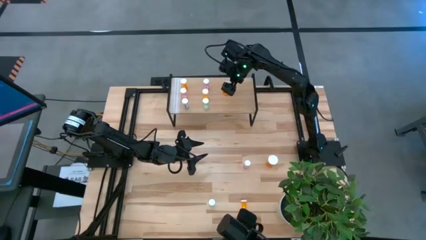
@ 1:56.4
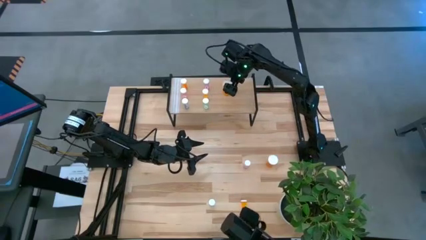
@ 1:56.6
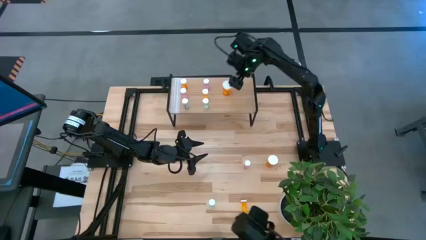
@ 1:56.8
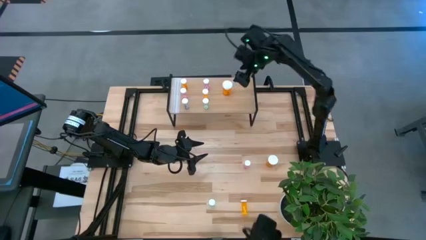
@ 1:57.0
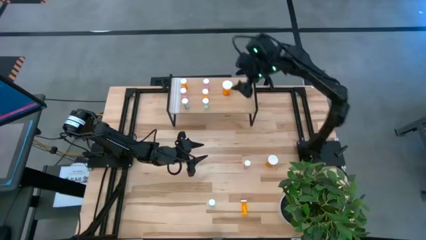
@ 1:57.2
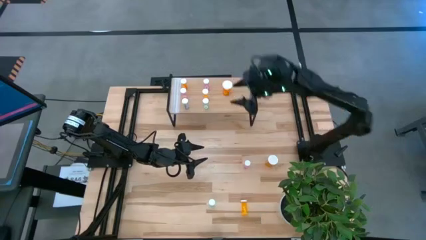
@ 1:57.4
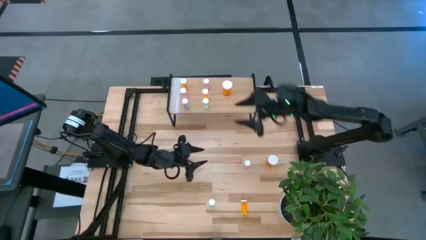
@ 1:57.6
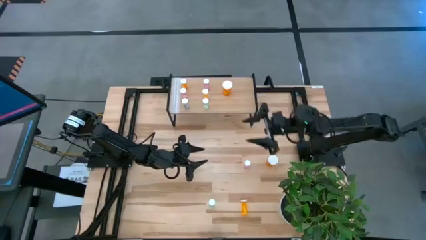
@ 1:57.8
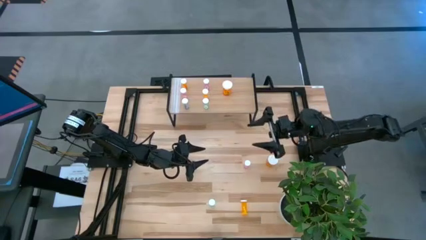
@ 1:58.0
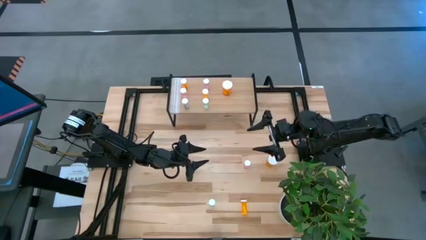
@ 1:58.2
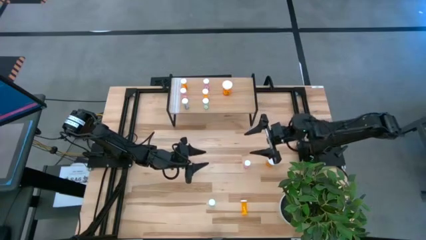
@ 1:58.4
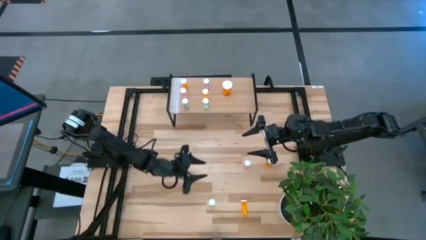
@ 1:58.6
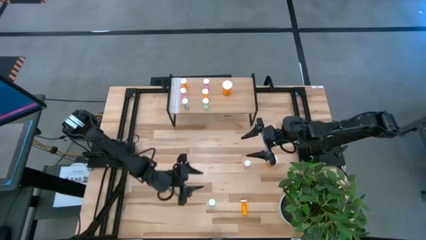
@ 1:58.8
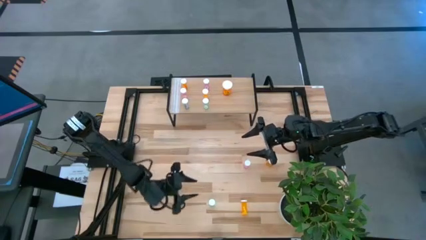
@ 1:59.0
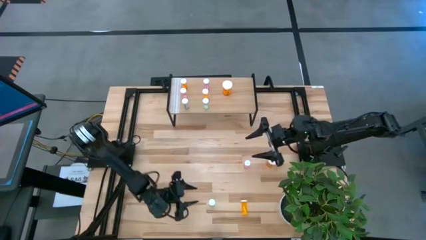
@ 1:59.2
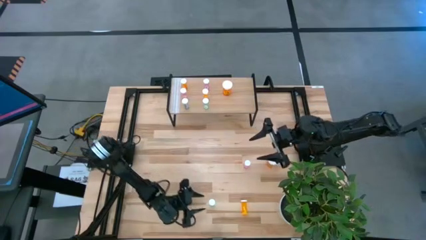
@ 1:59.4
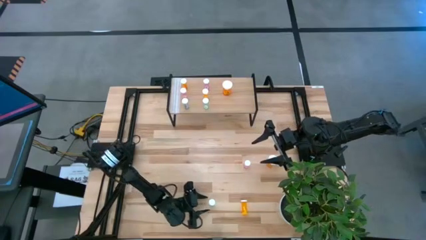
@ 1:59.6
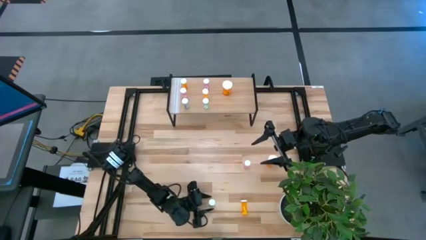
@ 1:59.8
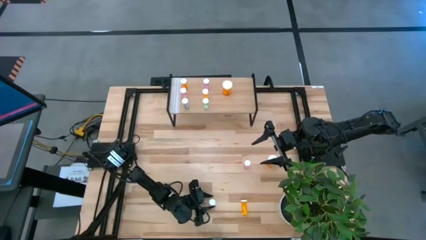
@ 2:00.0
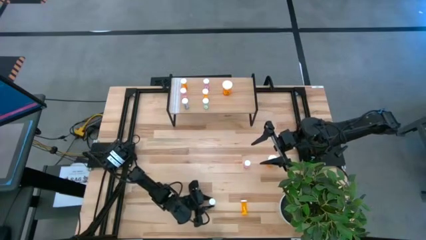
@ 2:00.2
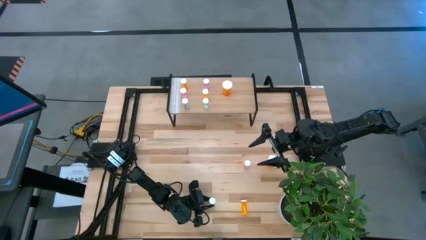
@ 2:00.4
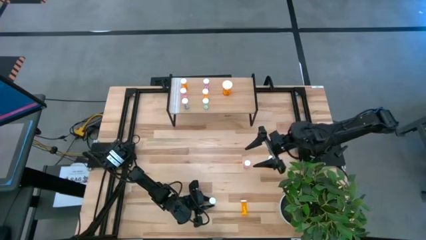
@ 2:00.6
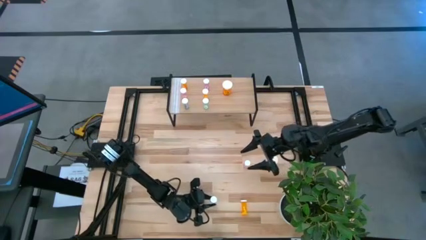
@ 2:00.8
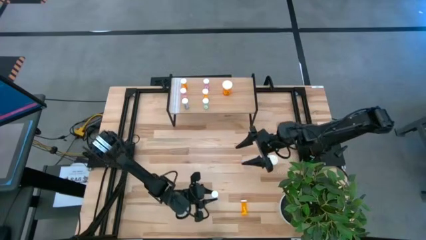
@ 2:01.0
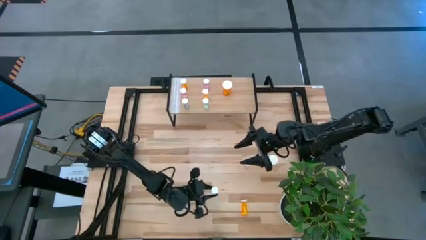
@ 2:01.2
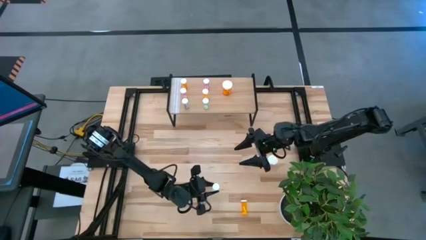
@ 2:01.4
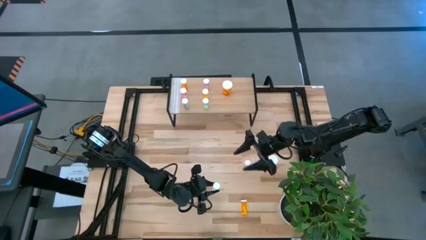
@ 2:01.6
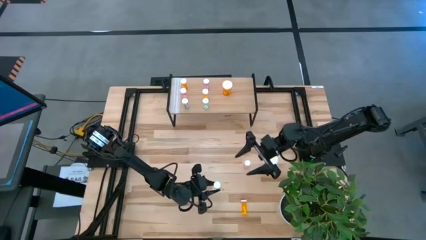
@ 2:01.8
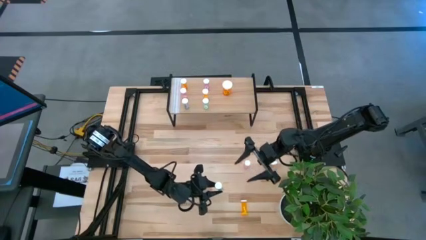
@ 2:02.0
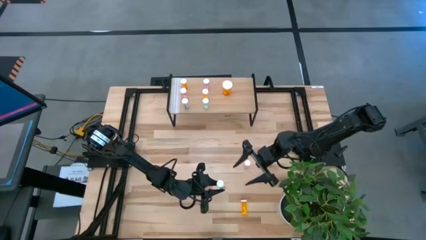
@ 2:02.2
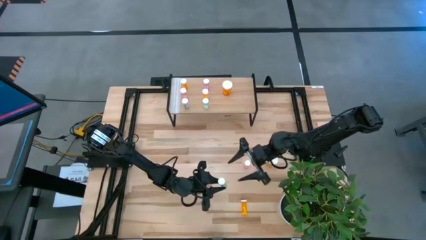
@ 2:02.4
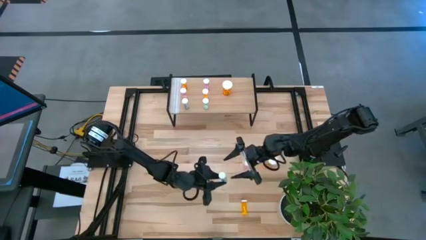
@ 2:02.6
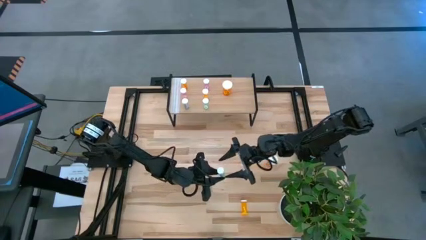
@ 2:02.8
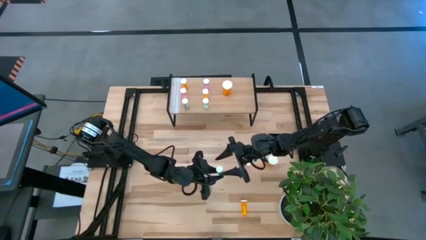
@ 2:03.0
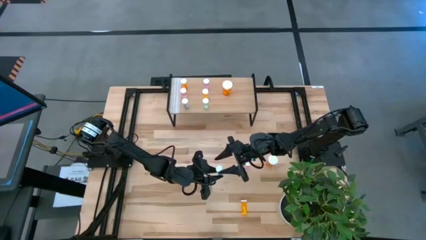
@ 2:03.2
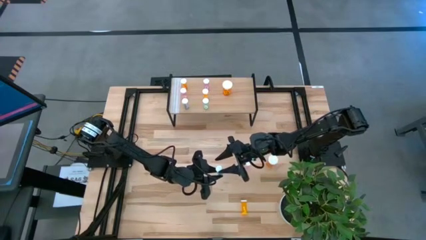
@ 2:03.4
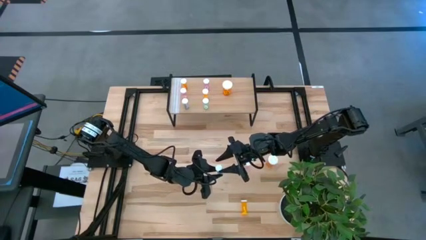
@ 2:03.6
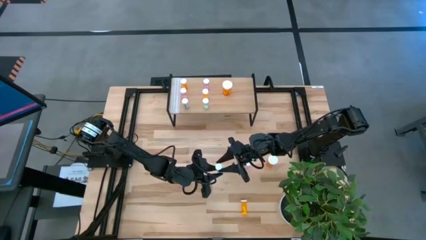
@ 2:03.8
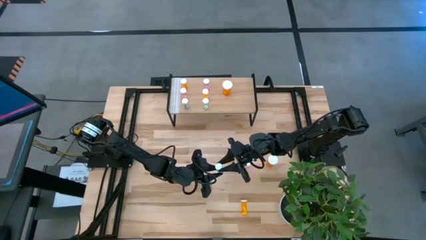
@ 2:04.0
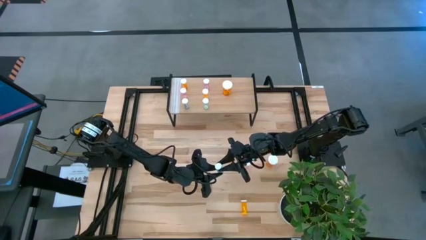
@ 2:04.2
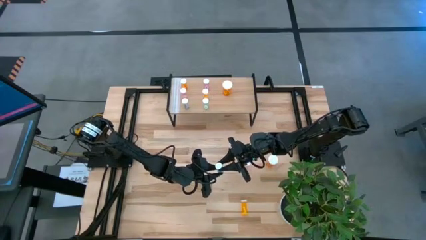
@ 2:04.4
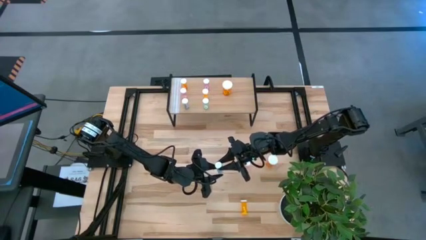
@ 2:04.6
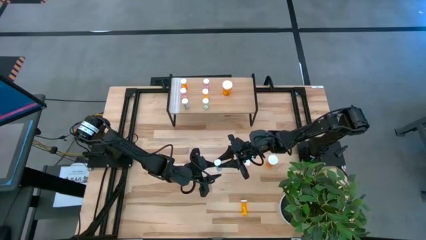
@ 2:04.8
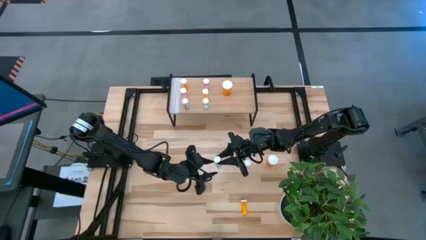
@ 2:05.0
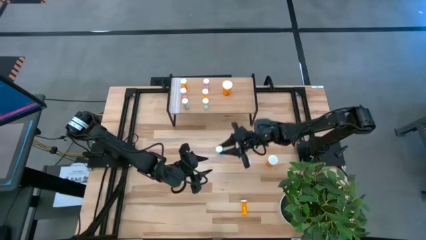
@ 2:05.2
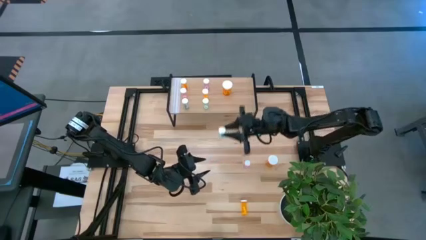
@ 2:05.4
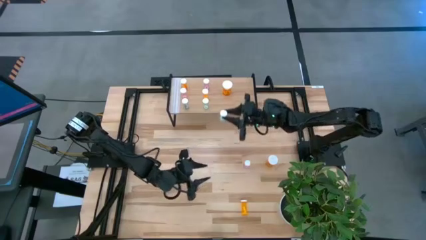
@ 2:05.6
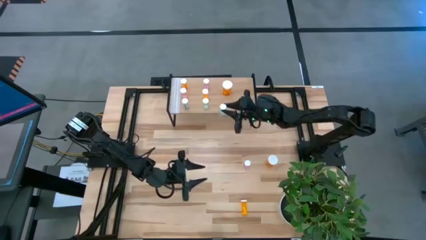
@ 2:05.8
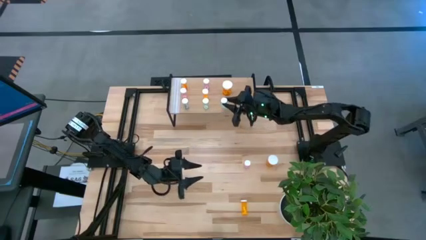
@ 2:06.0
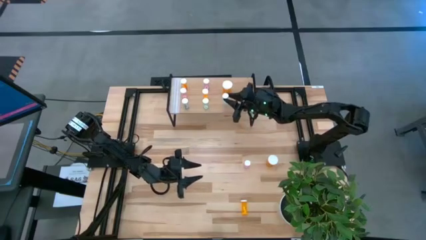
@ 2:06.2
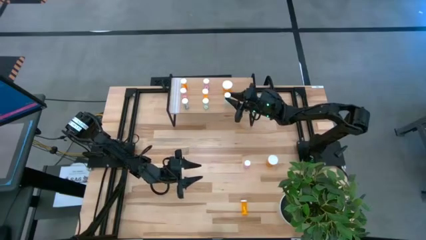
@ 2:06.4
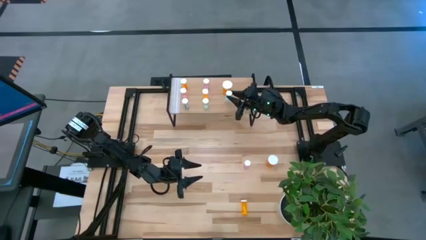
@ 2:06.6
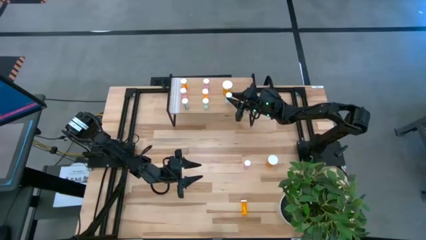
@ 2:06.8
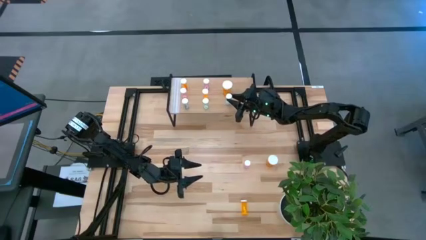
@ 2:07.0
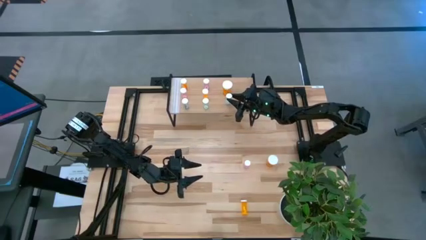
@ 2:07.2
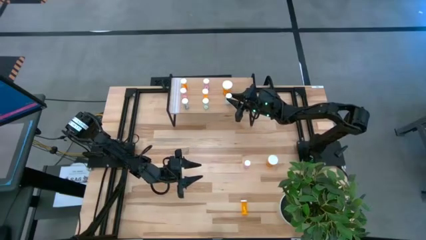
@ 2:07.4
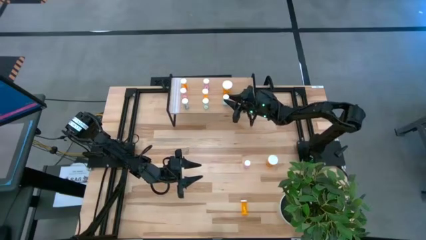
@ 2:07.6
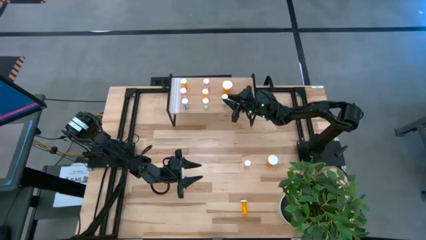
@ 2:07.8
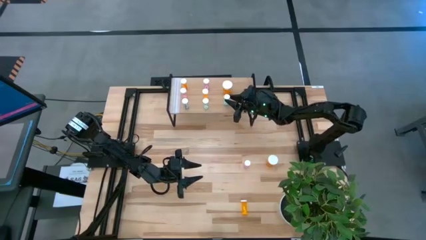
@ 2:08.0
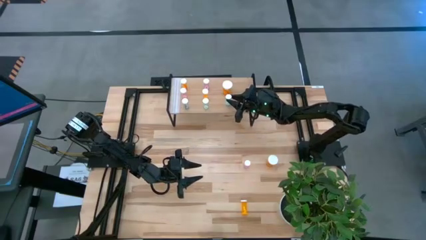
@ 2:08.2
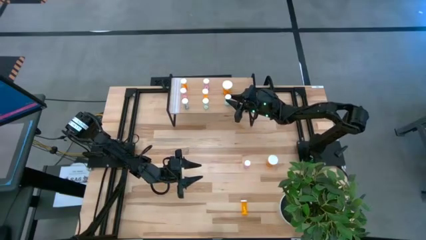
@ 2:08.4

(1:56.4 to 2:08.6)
Task: Pick and place medicine bottles onto shelf by color
Put the blue pill bottle on the shelf

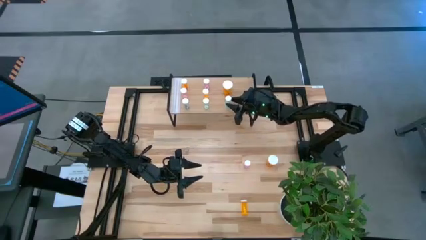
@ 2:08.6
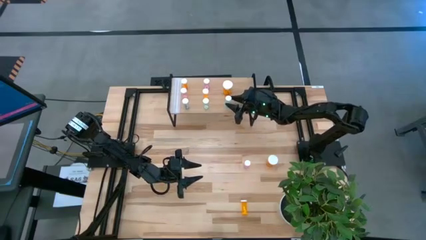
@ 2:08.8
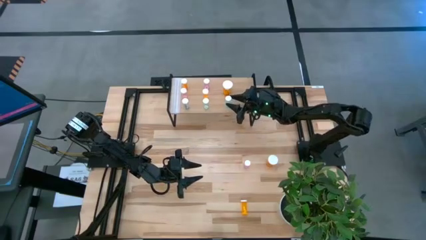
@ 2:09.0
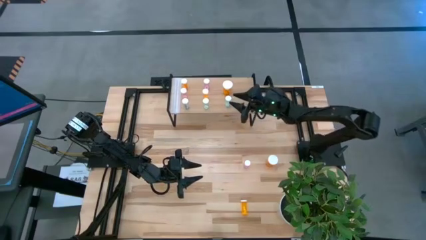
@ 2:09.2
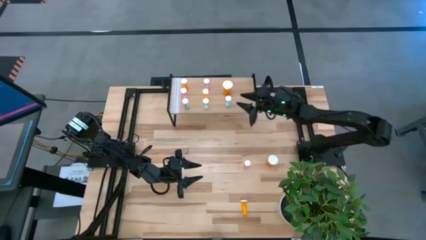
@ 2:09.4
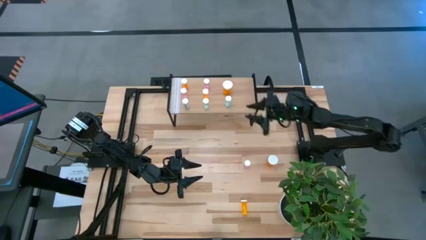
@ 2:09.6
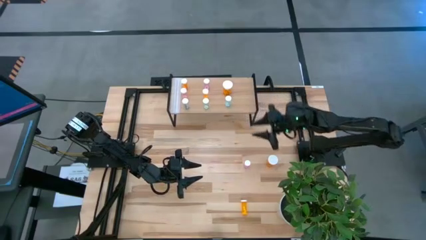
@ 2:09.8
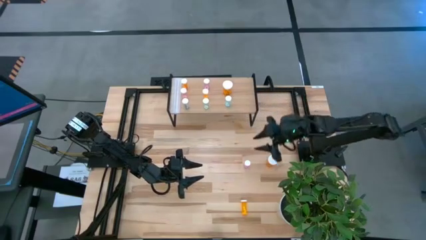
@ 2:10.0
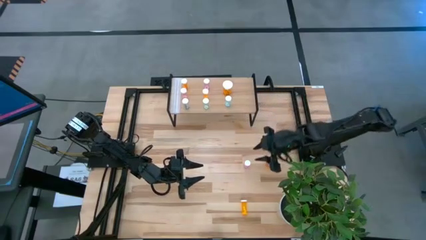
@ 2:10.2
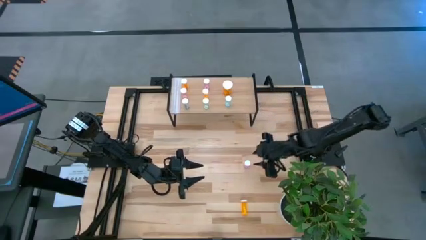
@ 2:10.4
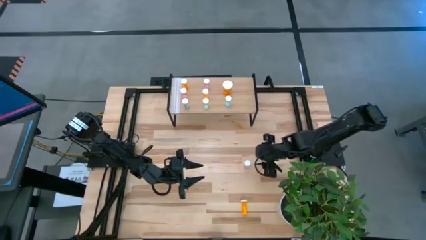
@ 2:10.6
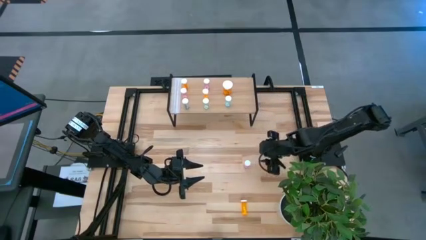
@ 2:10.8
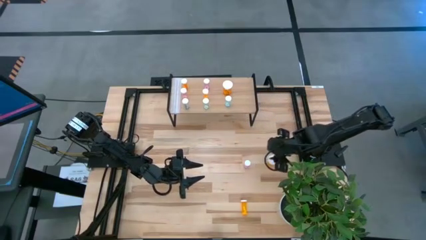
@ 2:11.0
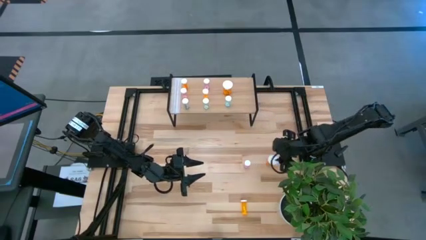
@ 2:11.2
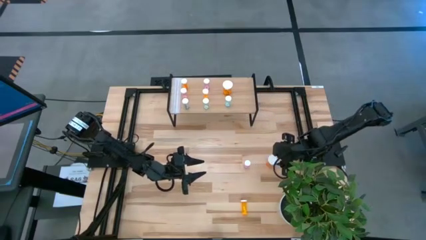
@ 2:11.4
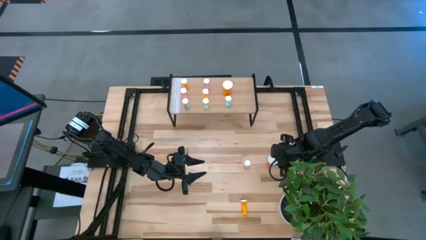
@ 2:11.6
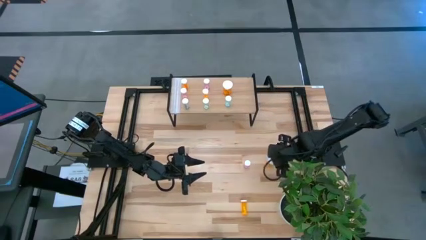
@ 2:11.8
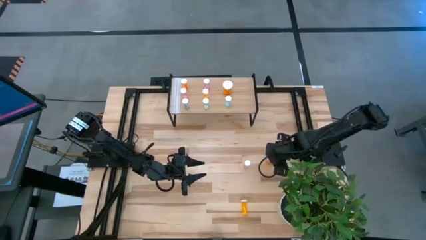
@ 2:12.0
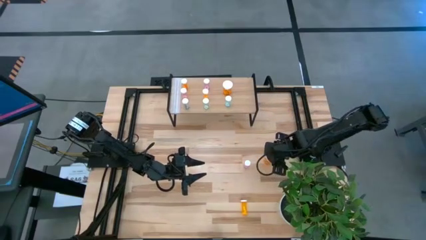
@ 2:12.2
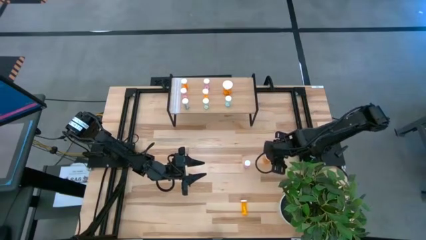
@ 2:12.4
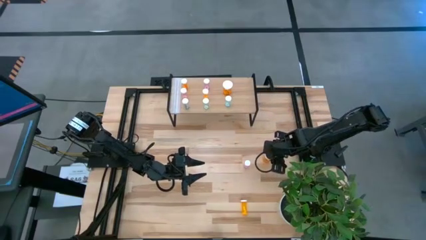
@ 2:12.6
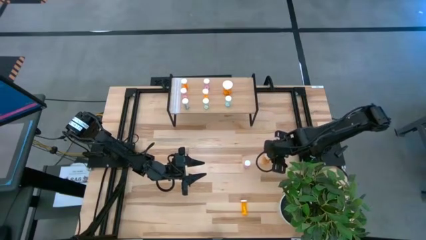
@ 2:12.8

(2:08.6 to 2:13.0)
Put the large orange pill bottle on the shelf

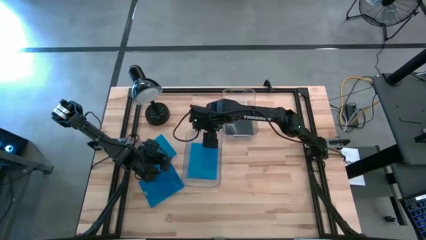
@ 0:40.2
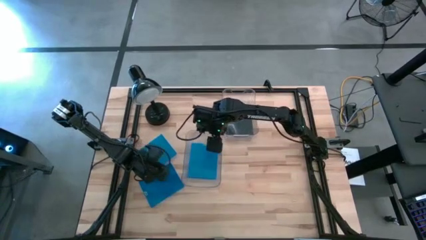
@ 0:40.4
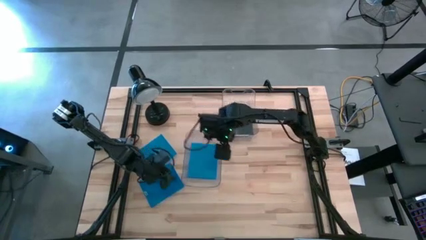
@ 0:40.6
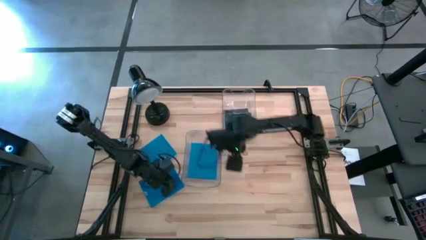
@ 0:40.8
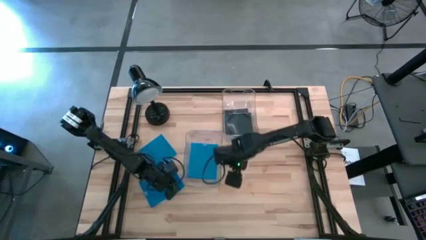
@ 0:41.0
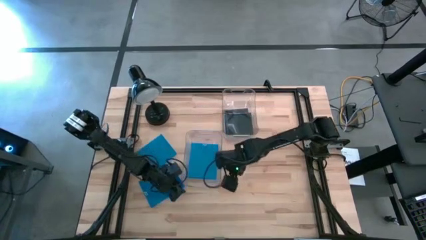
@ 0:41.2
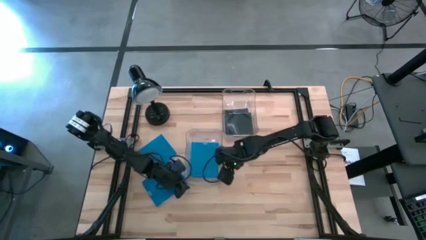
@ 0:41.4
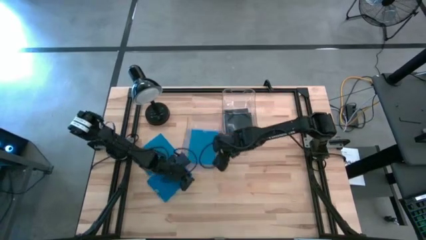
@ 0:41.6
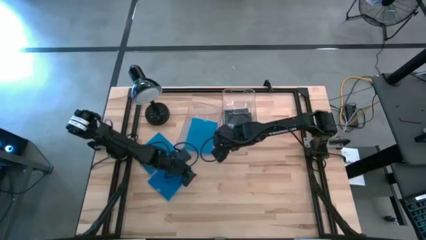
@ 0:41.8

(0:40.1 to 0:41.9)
Task: Pick & place jewel cases by type
Adjust the left transparent bin on the table
